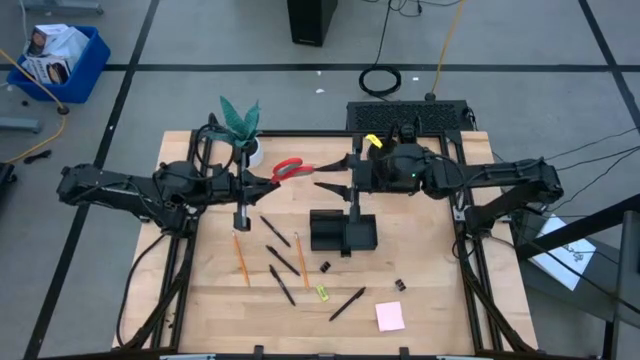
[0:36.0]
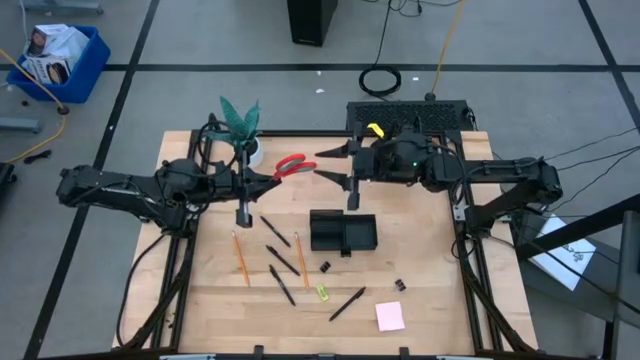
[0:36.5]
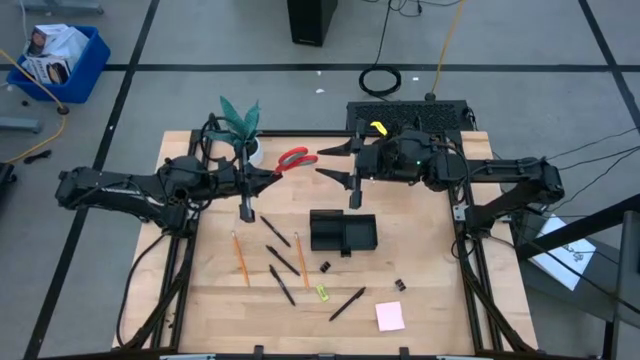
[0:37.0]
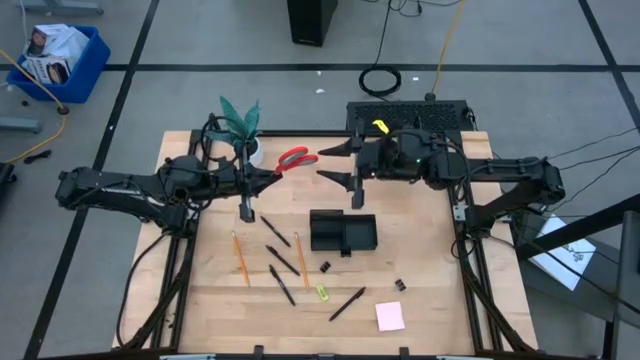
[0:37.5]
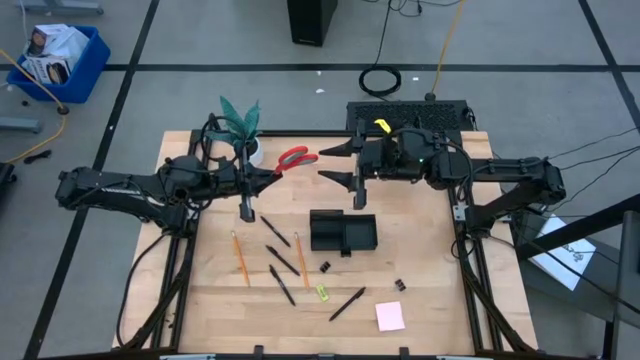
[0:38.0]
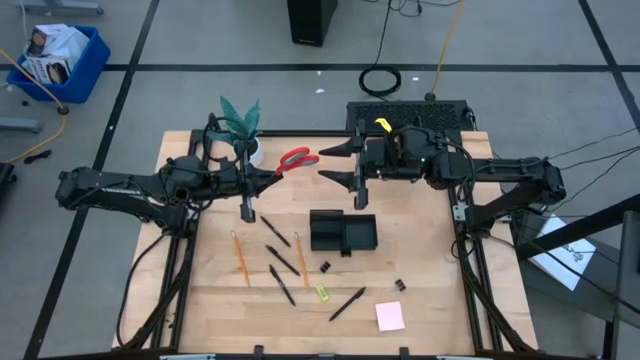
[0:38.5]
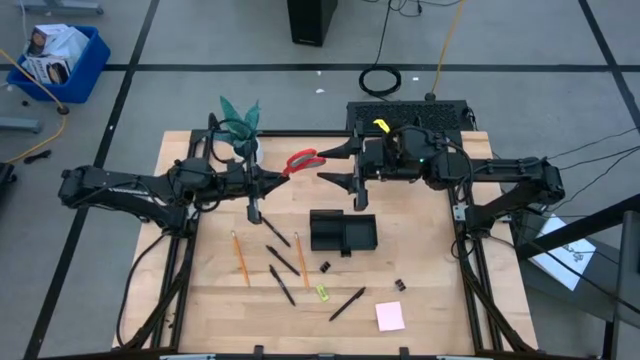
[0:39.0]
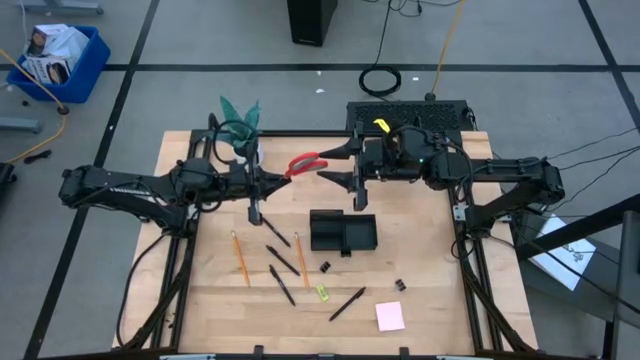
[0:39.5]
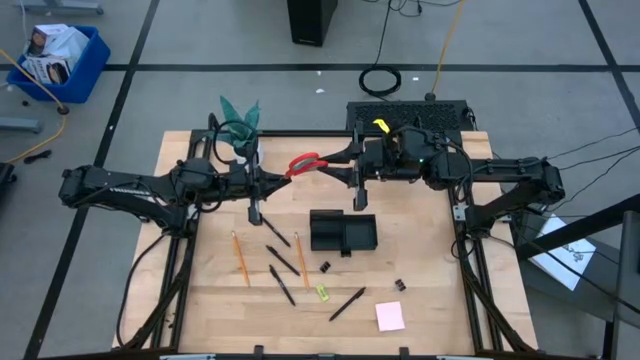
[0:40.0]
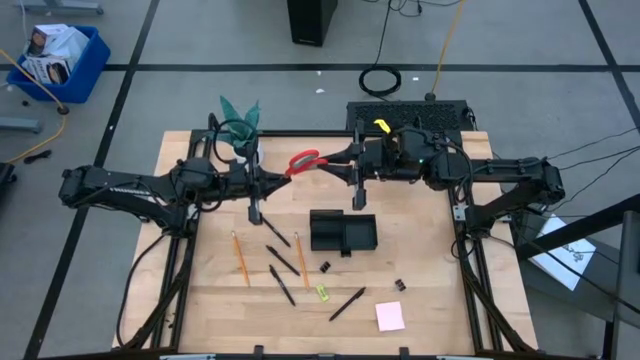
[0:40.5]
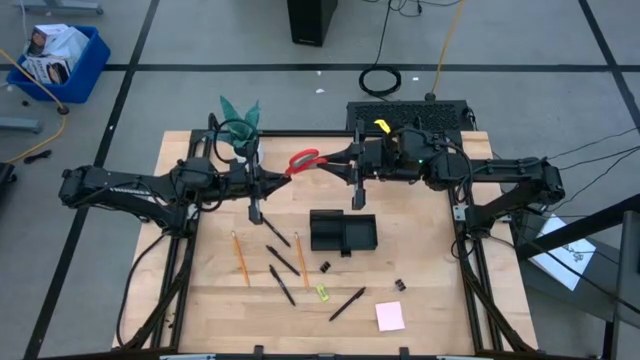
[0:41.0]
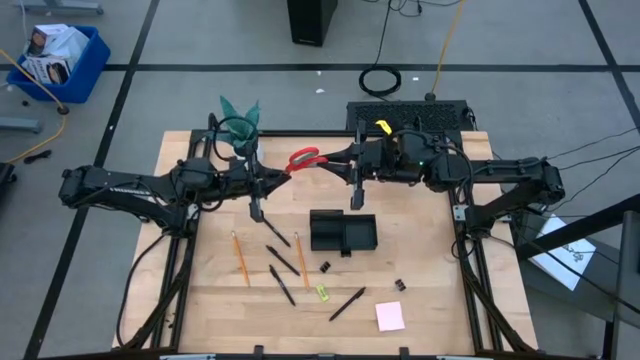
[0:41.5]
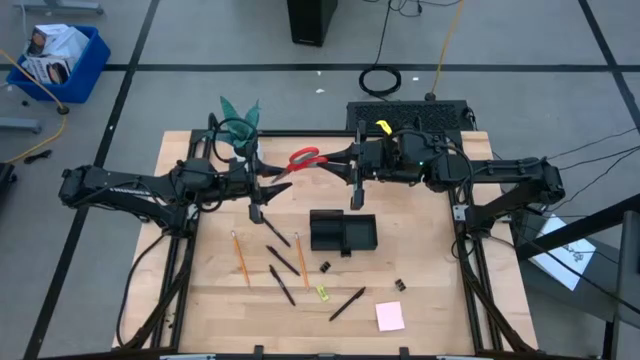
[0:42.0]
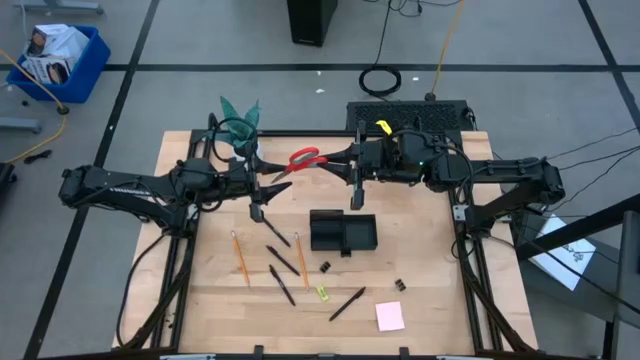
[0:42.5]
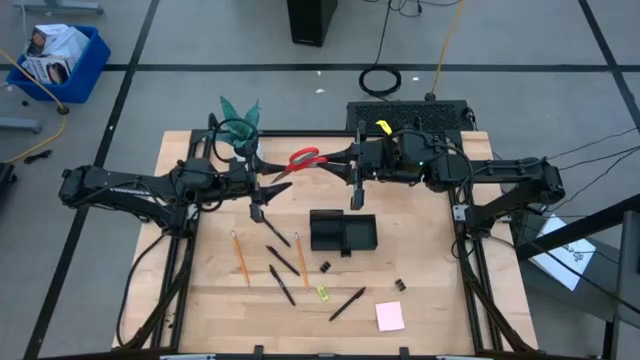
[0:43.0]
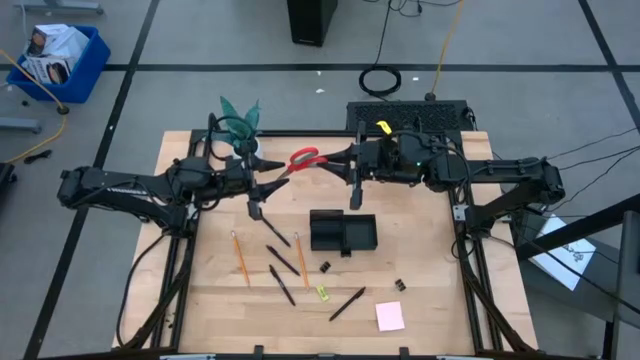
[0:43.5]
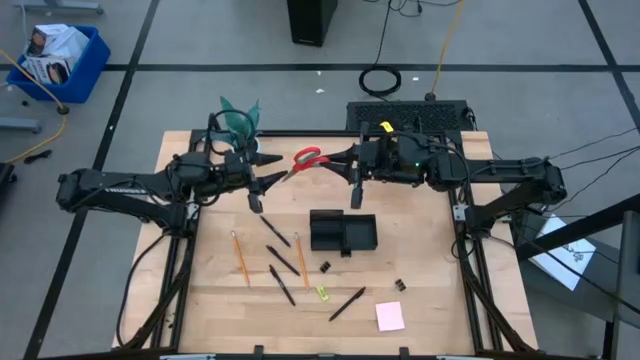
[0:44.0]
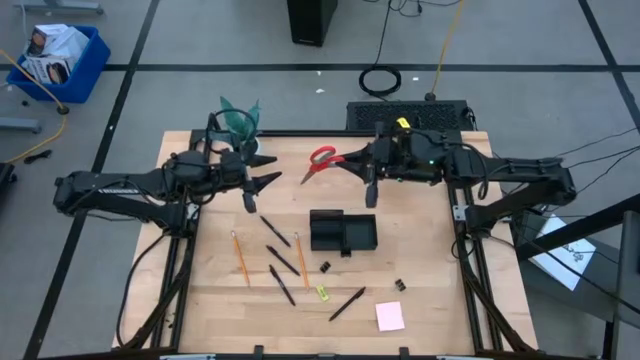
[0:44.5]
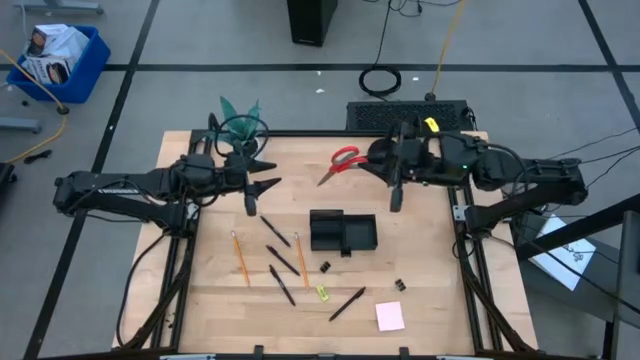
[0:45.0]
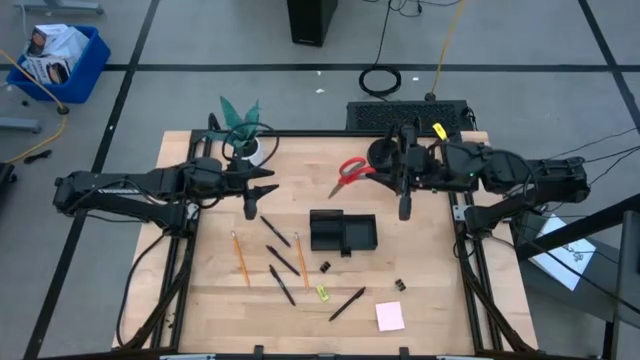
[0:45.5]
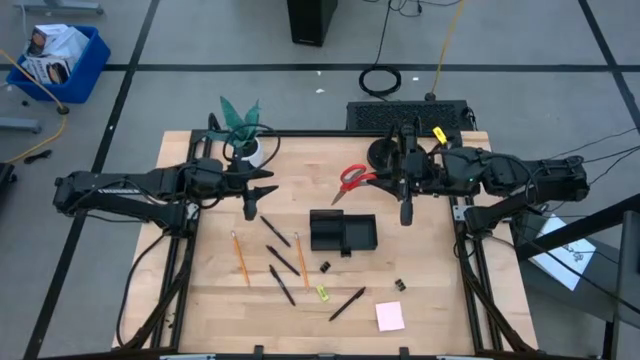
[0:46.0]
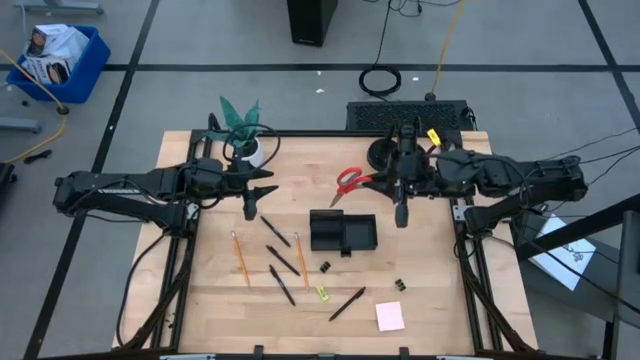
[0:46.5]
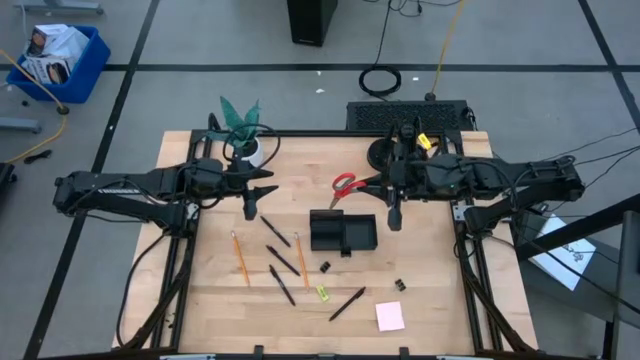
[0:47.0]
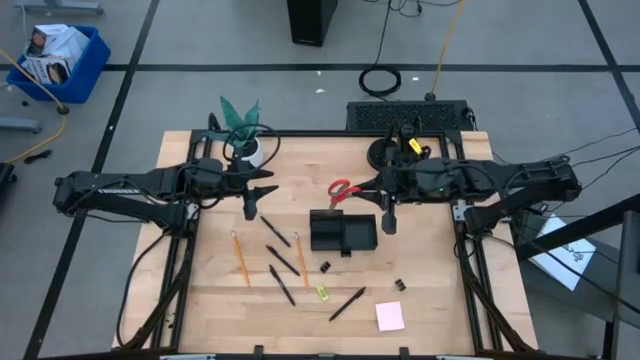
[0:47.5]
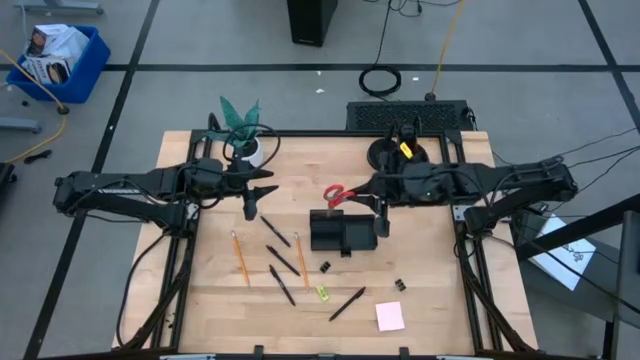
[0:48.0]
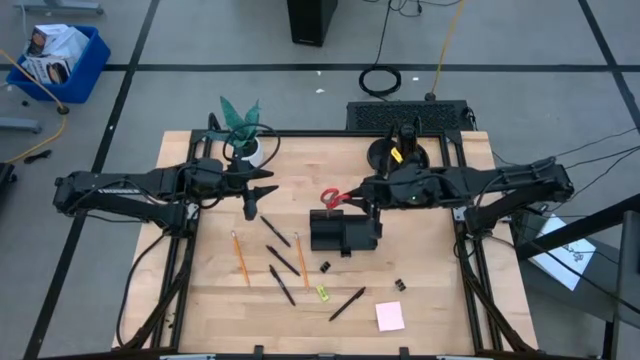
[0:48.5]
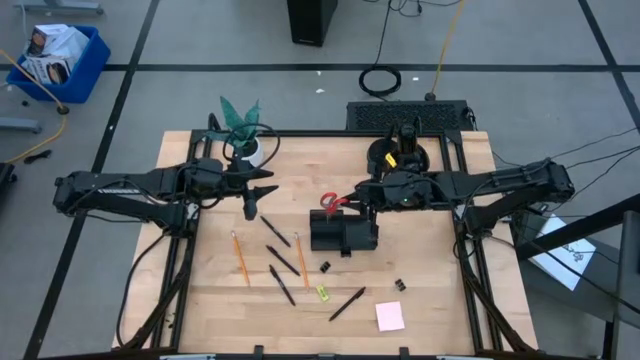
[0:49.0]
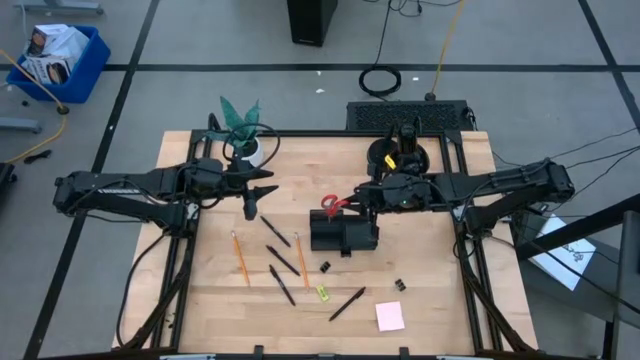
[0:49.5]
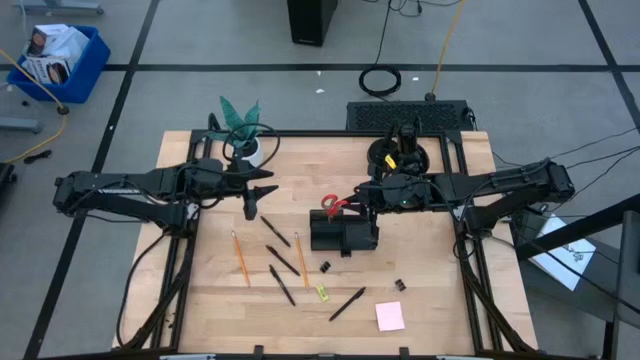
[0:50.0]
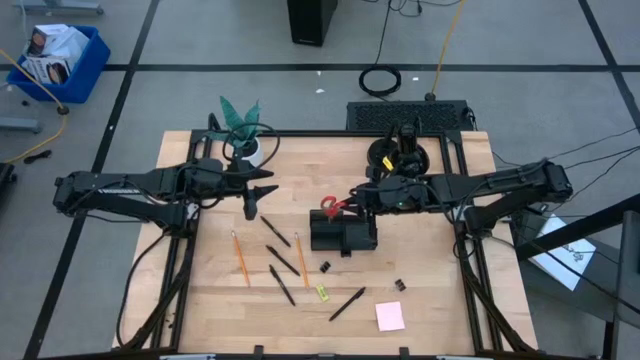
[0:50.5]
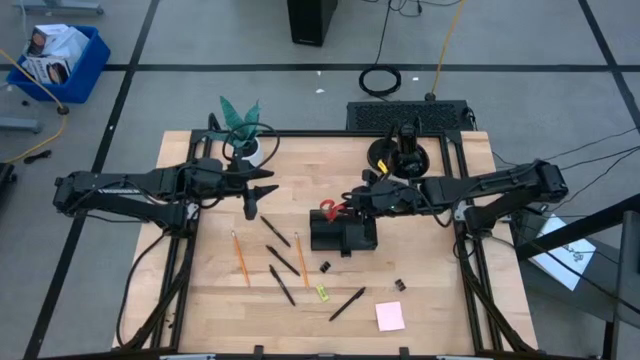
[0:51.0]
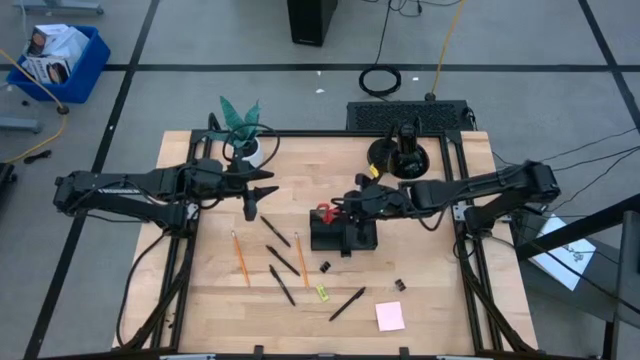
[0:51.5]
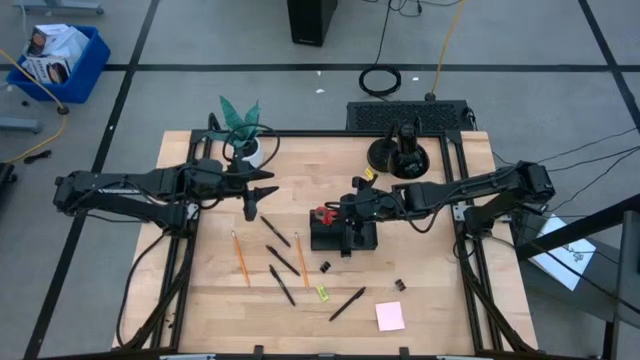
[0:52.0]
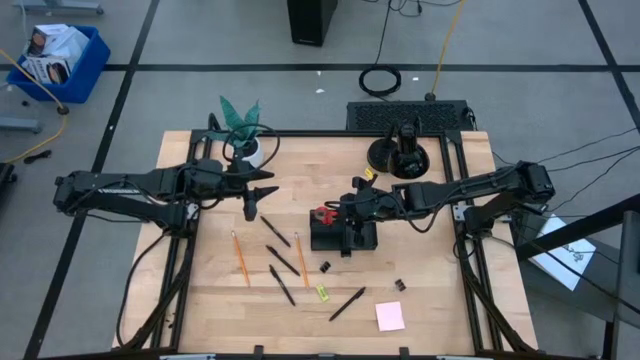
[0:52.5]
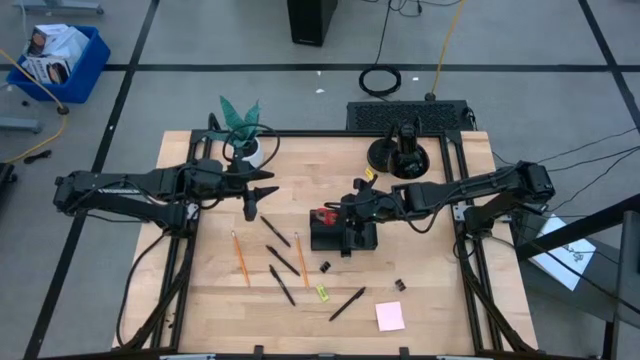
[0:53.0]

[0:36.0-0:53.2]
Task: Pick and place office supplies into organizer
Put the orange scissors into the black desk organizer

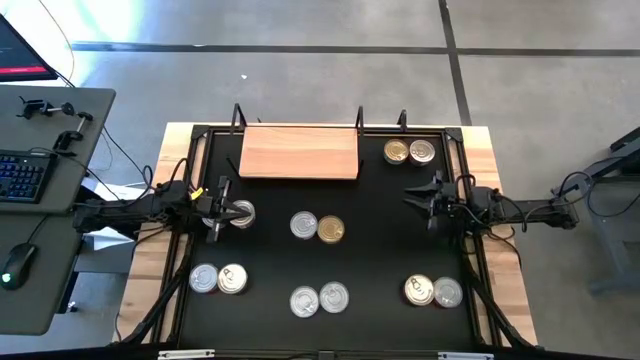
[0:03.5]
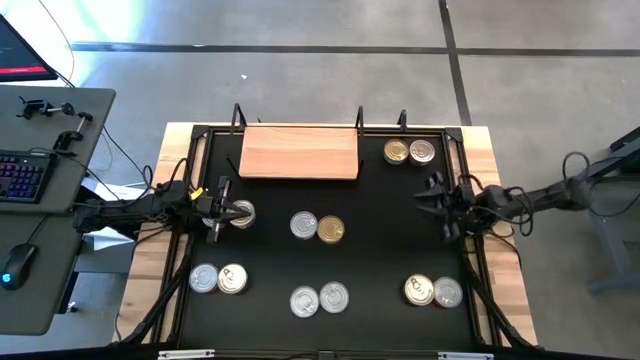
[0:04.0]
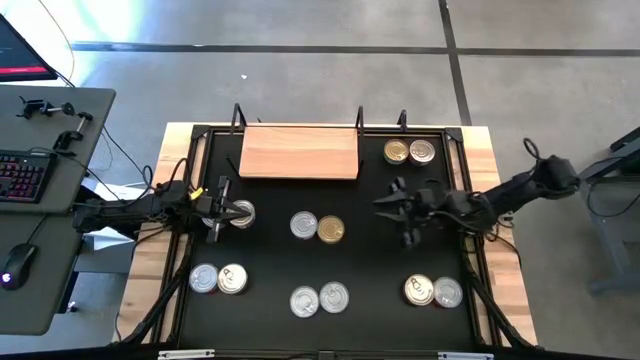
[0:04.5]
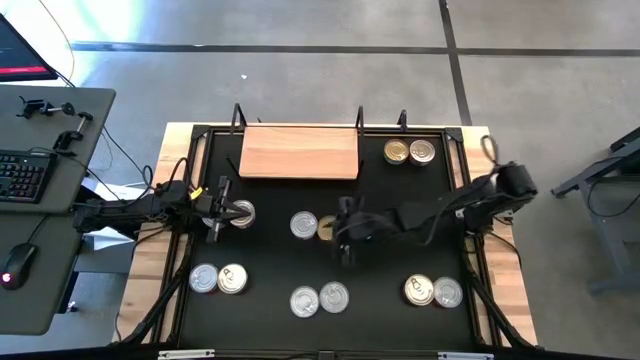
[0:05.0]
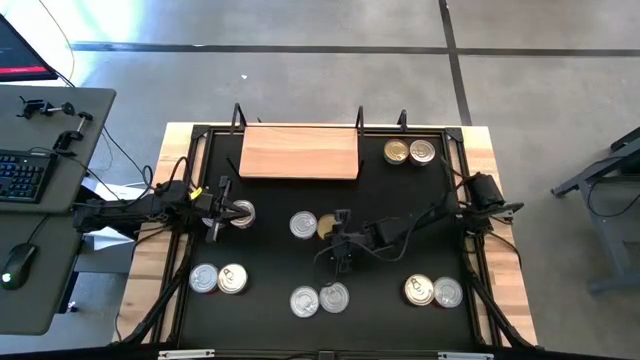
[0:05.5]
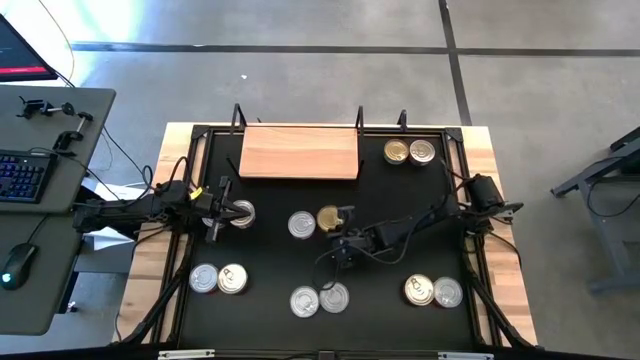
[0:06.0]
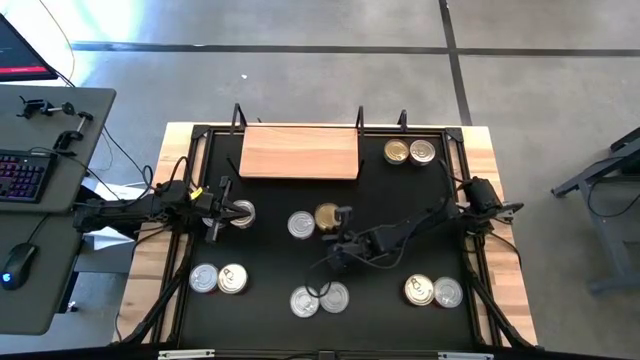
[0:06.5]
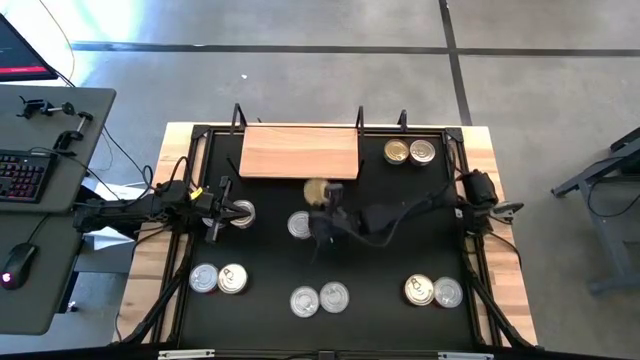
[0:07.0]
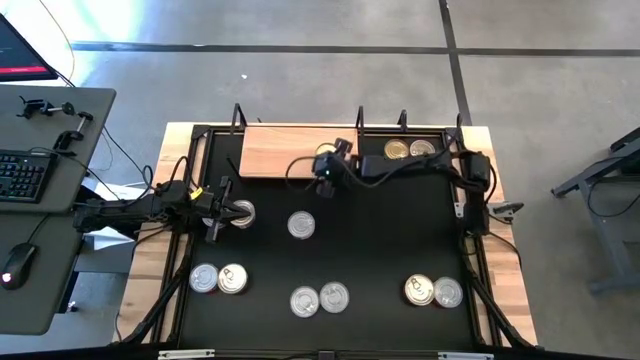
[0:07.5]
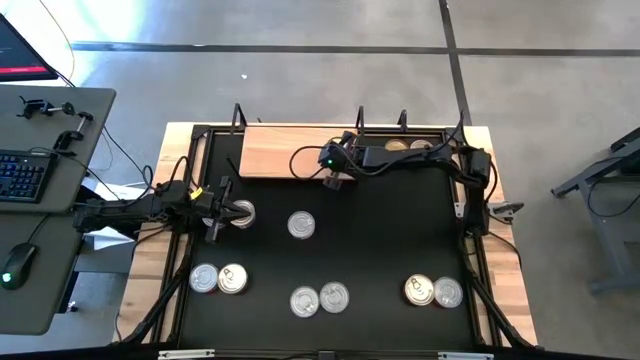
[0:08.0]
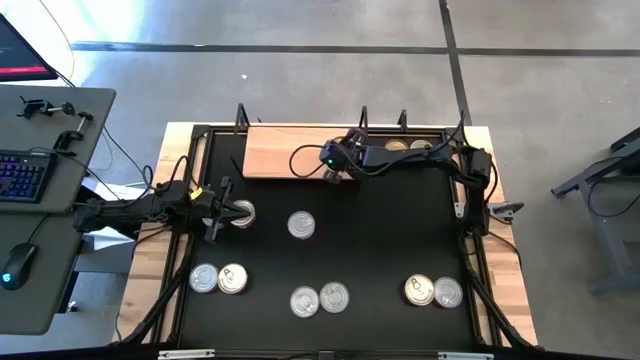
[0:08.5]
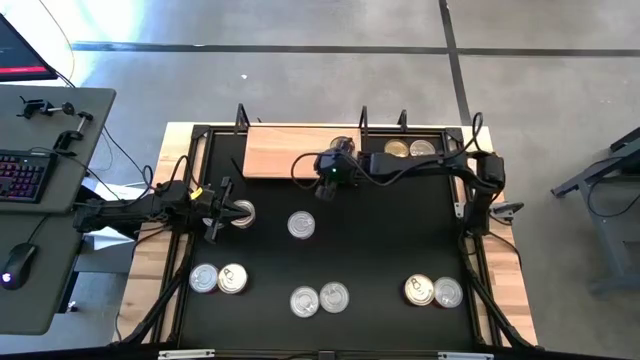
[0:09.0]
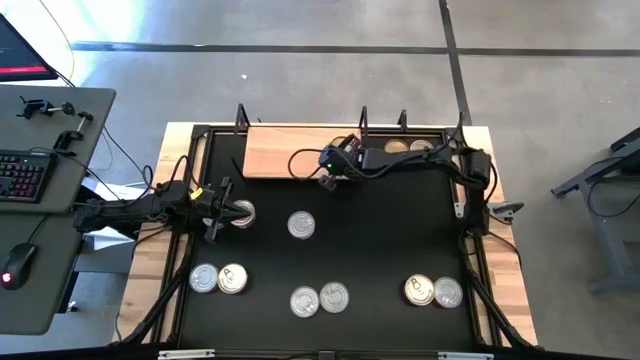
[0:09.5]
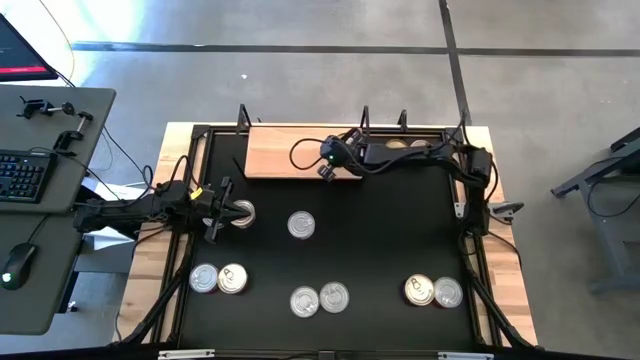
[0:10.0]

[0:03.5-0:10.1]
Task: Stack canned seafood by type on shelf
Put the green tuna can on the shelf
